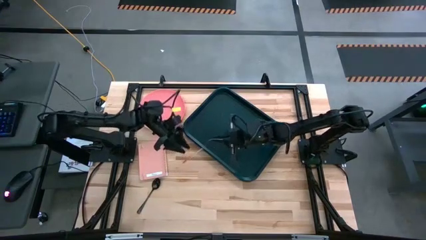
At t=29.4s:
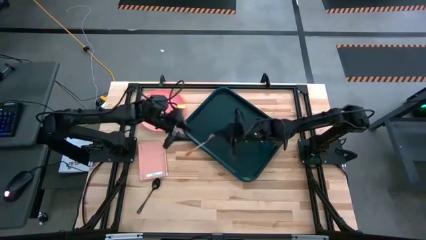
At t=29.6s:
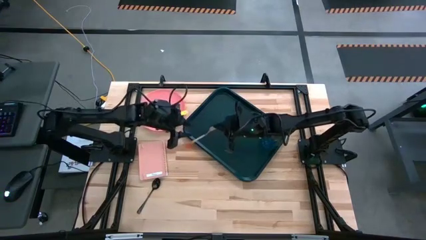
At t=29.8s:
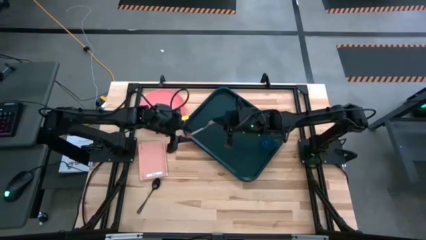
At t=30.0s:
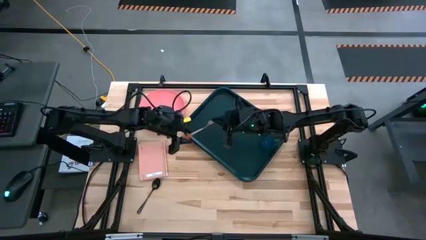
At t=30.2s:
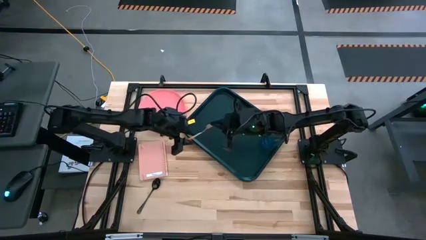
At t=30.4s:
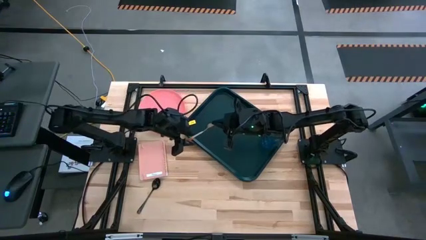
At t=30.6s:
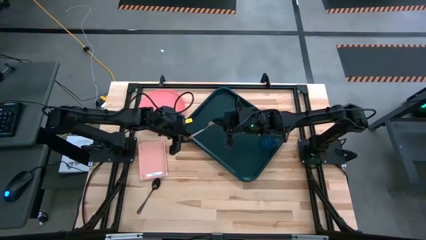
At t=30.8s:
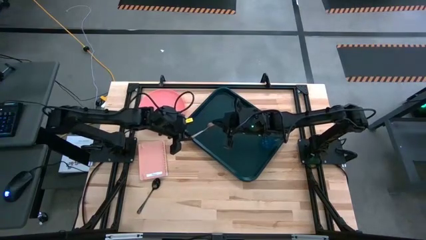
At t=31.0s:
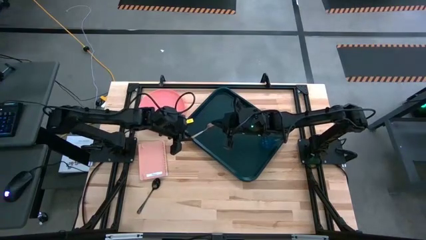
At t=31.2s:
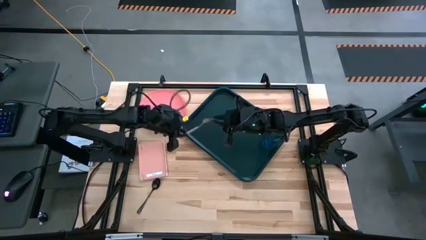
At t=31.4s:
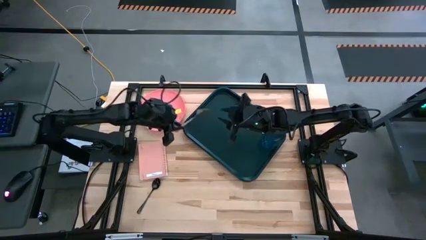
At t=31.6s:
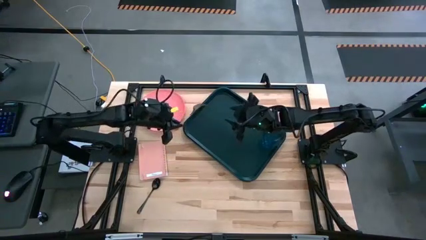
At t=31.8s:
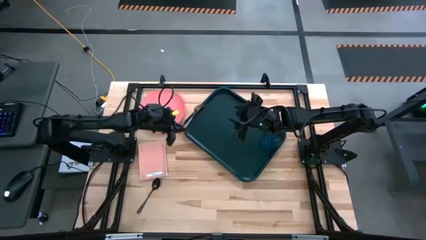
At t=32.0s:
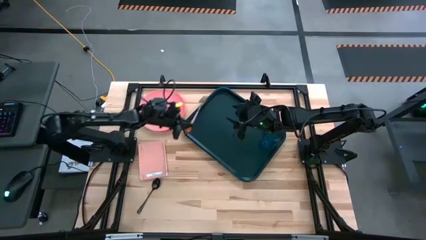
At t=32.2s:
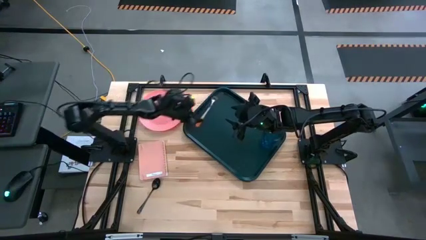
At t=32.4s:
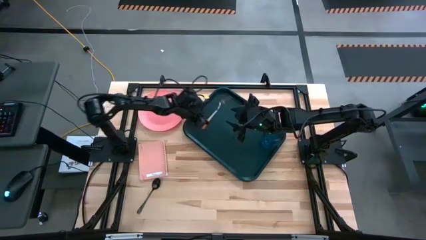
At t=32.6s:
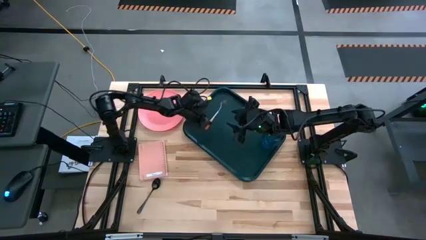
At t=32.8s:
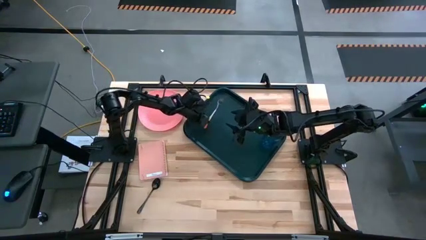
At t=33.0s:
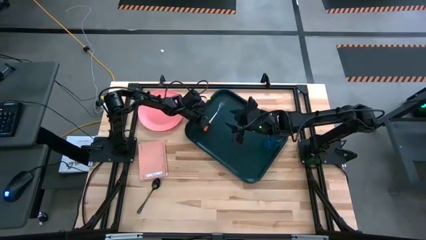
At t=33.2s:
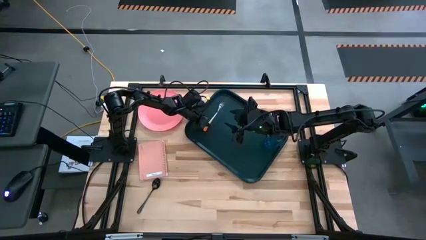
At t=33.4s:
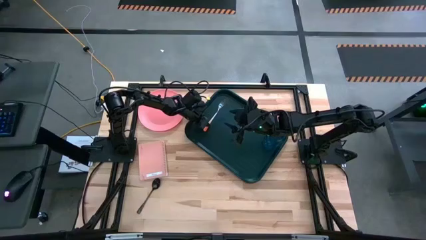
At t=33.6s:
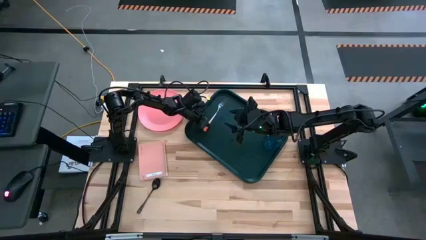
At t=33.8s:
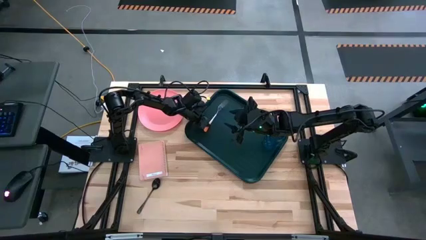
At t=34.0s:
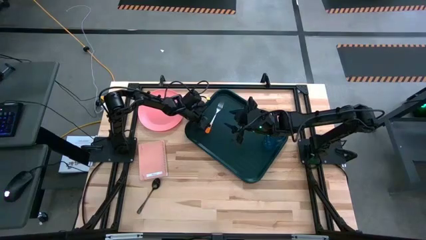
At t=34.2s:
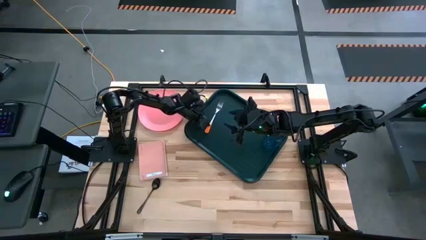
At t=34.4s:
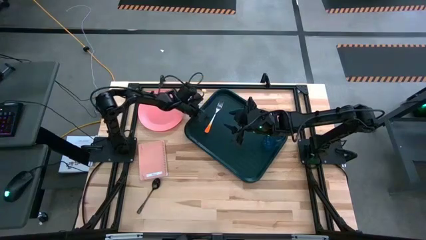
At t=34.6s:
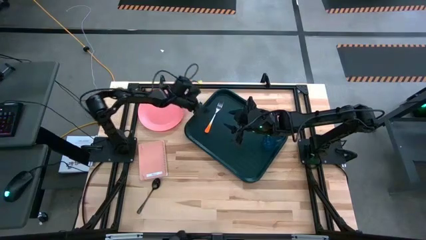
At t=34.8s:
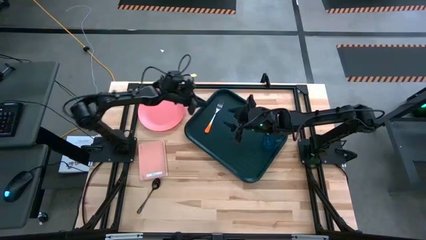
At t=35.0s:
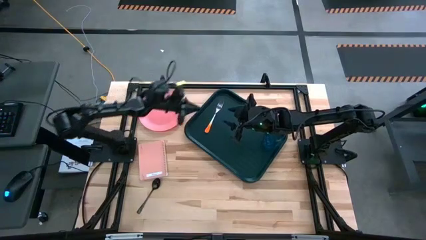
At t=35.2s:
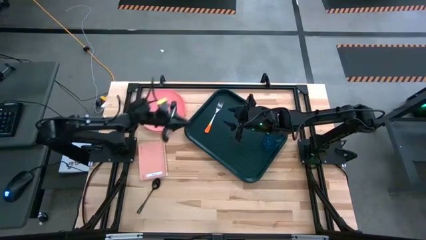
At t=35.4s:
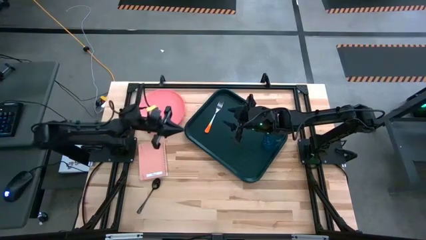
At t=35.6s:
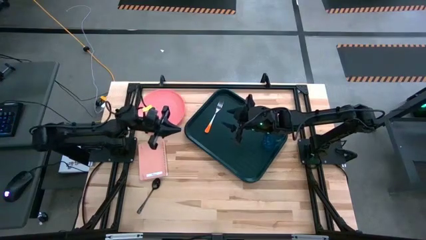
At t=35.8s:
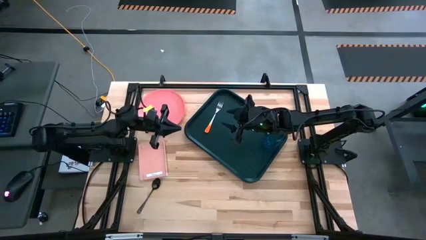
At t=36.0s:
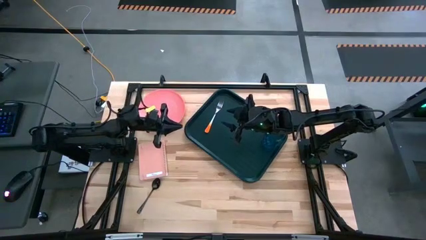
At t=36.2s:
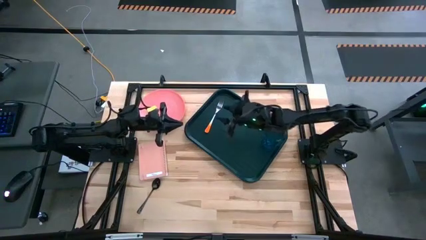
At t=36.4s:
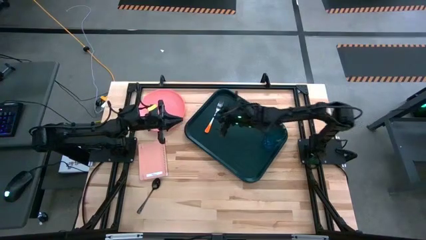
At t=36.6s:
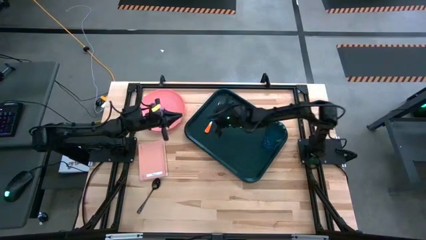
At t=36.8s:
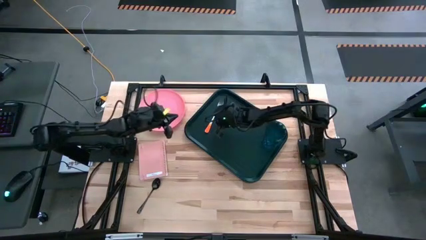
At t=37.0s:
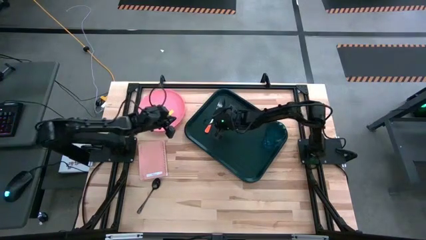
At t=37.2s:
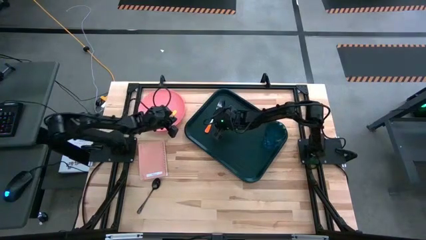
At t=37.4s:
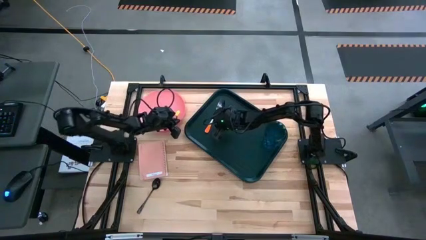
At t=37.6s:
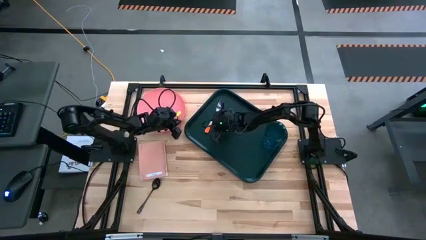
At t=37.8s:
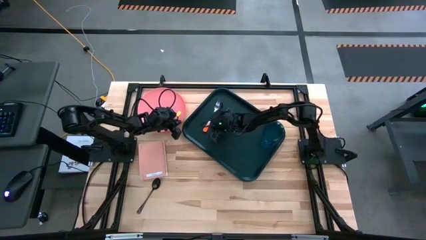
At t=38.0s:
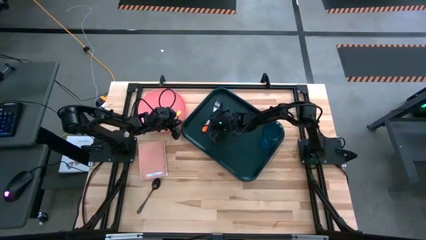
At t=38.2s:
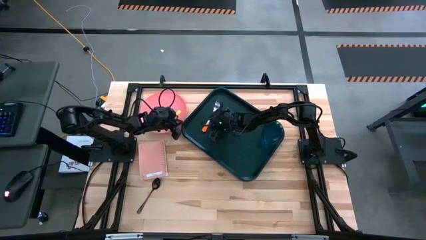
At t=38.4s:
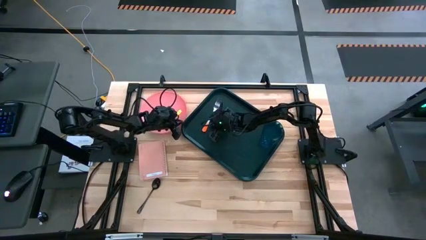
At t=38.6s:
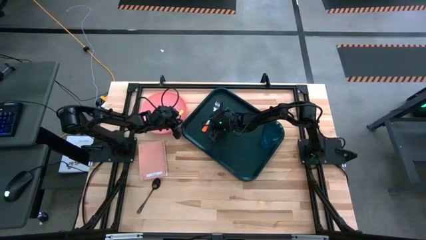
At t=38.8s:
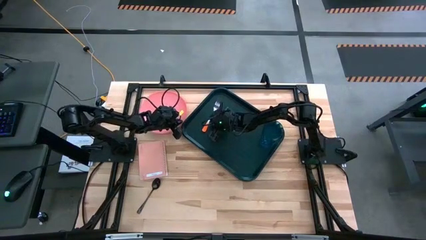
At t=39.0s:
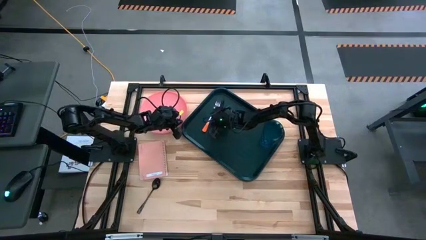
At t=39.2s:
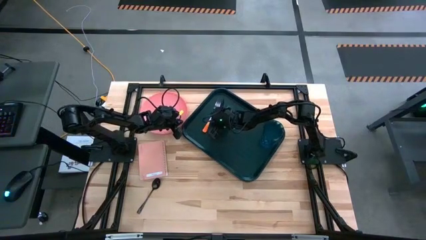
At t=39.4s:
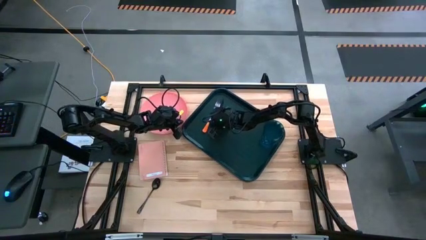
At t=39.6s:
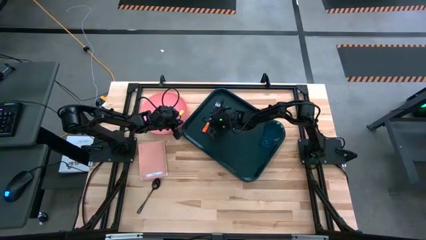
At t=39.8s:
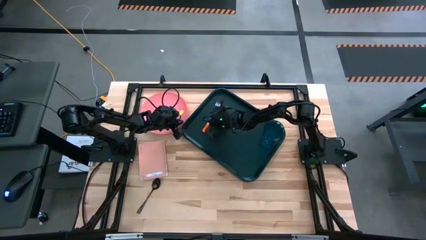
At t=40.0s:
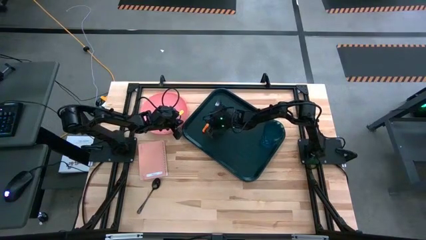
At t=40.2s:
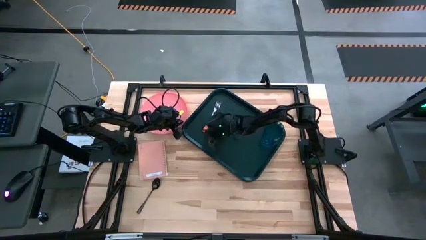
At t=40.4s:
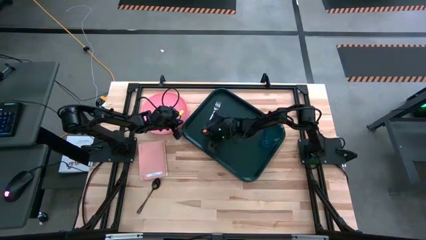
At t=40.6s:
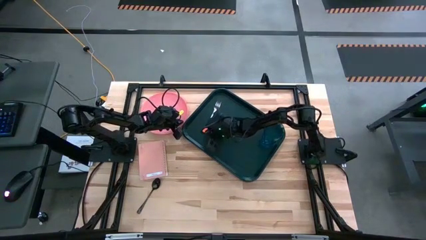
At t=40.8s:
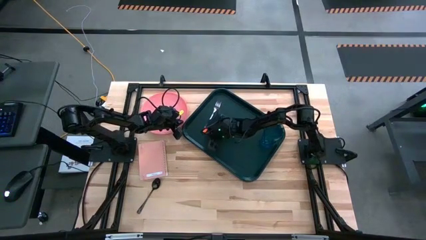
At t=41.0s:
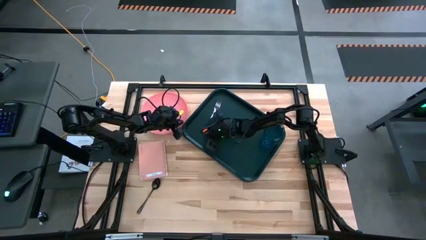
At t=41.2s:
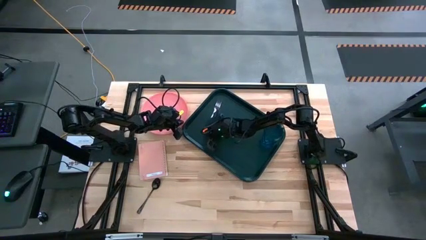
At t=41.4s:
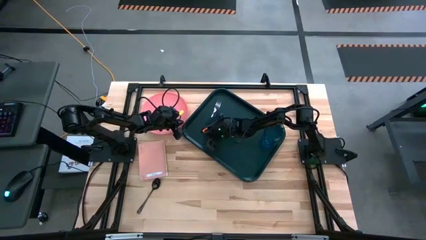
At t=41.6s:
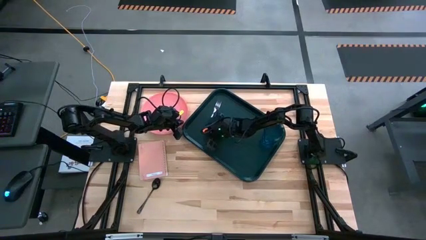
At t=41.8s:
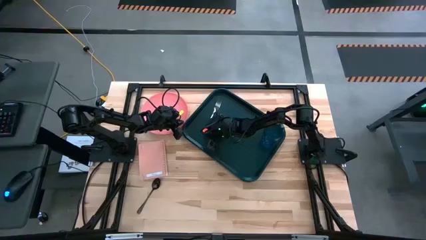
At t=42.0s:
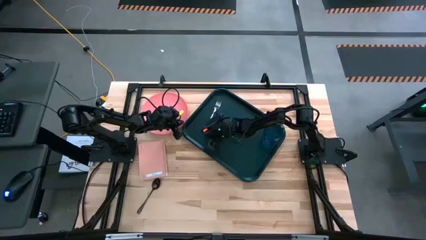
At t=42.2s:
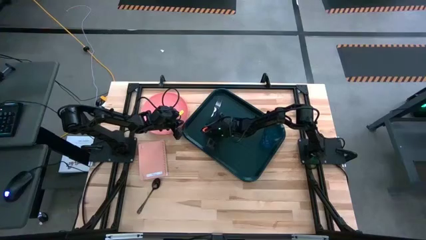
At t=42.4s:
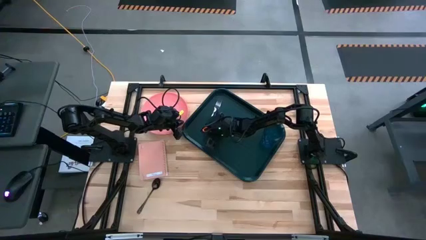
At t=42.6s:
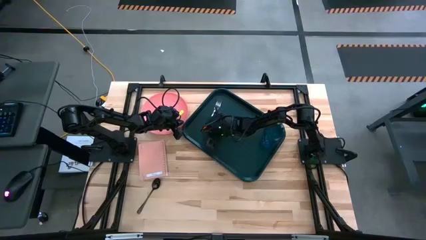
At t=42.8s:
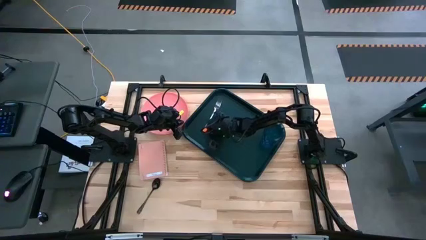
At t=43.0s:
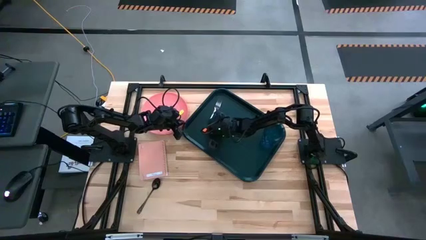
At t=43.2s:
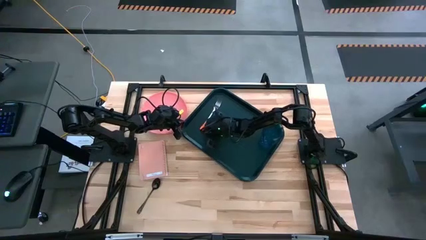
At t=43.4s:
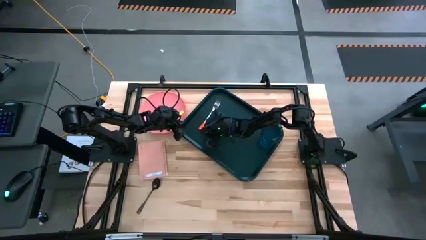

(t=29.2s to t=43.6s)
Task: Pick and place plate/cup/fork/spoon on tray
Put the orange fork on the black serving tray to the left

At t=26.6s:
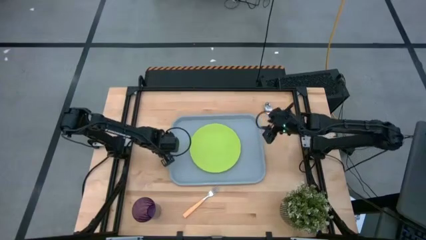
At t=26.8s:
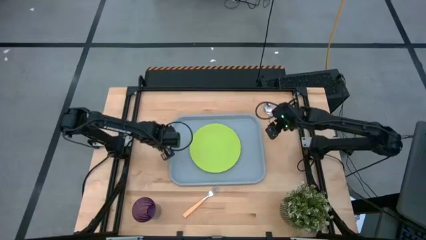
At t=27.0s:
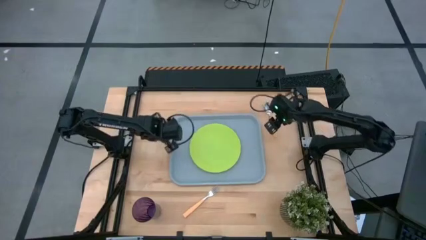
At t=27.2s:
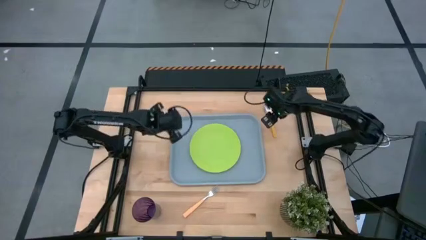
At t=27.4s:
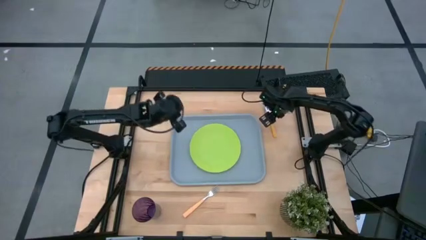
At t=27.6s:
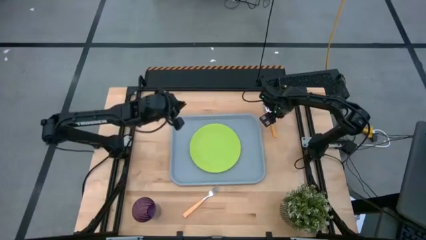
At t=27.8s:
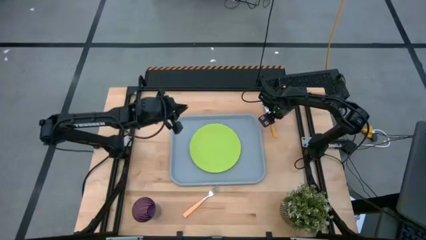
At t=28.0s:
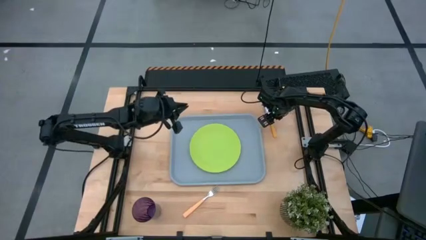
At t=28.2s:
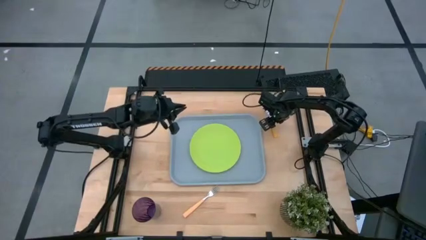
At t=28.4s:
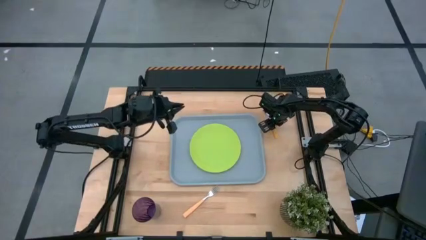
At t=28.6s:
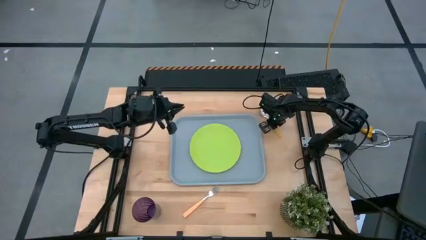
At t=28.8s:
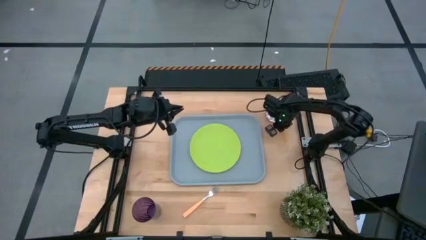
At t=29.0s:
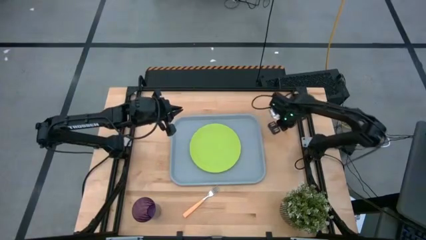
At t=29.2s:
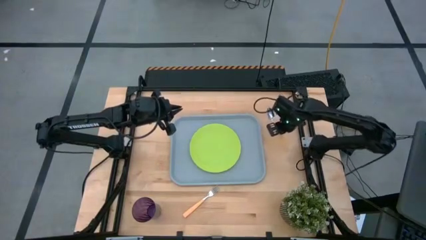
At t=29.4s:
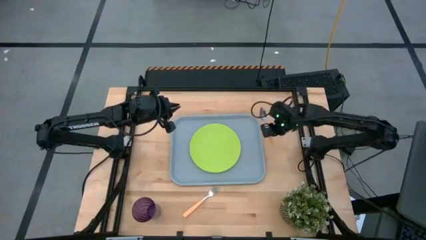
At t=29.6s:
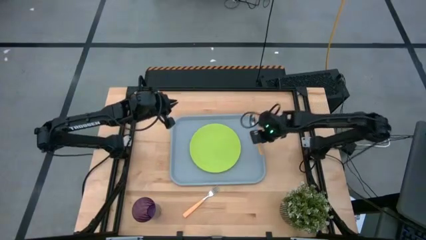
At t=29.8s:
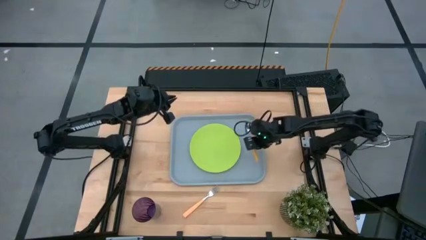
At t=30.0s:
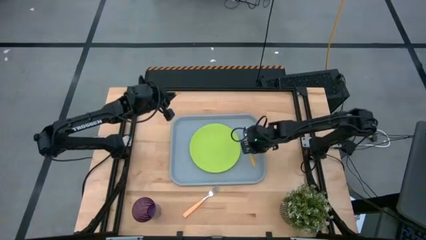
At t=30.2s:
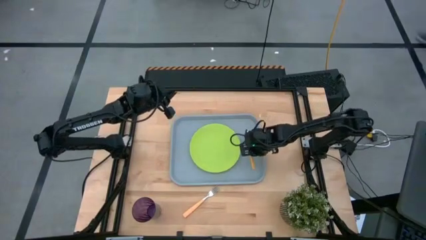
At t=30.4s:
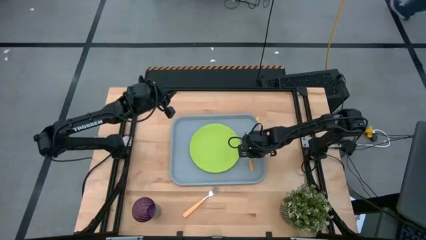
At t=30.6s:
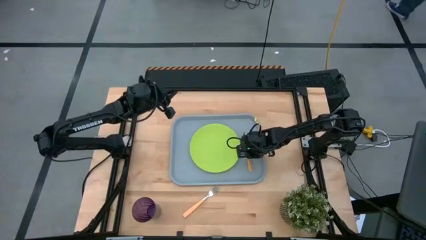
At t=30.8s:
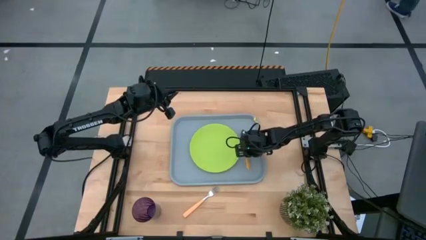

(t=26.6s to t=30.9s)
Task: Pick and place plate/cup/fork/spoon on tray
Put the yellow spoon on the gray serving tray to the right of the green plate
